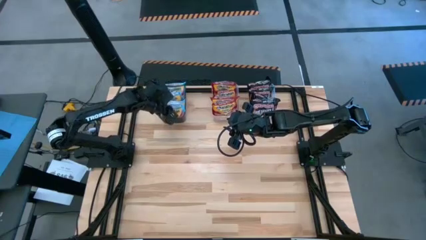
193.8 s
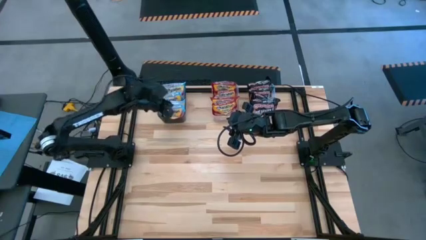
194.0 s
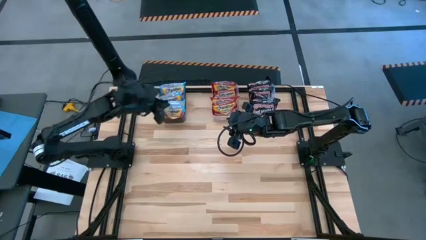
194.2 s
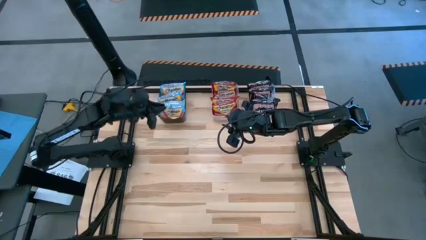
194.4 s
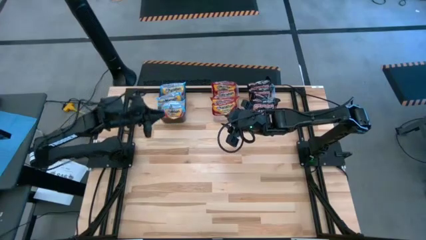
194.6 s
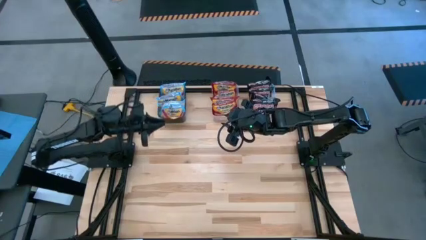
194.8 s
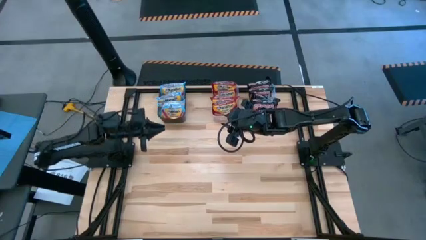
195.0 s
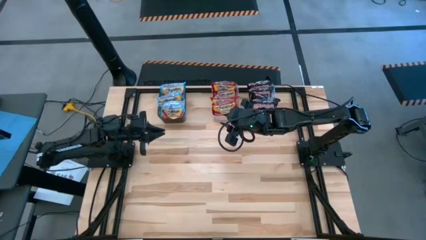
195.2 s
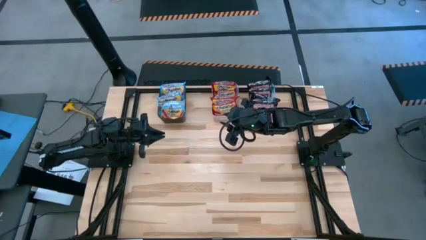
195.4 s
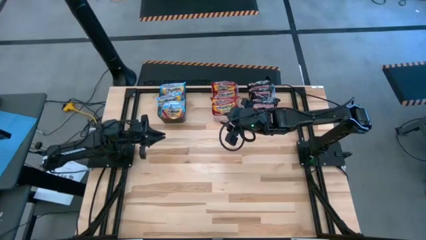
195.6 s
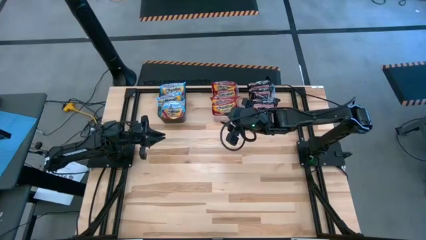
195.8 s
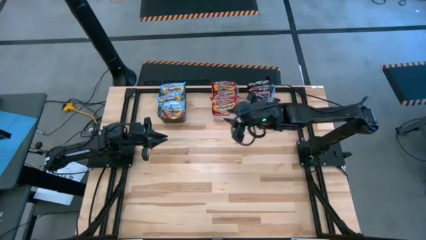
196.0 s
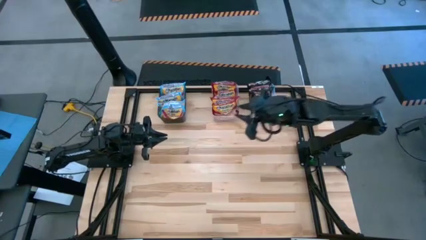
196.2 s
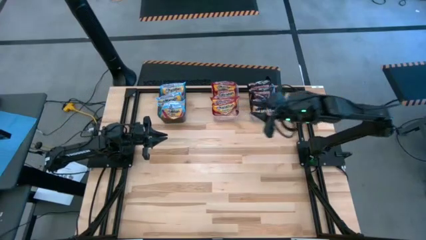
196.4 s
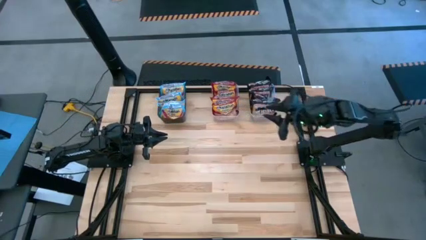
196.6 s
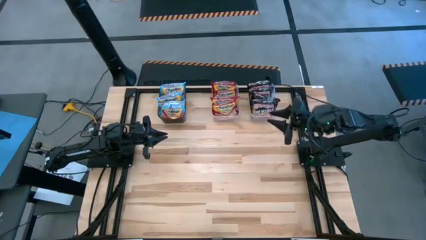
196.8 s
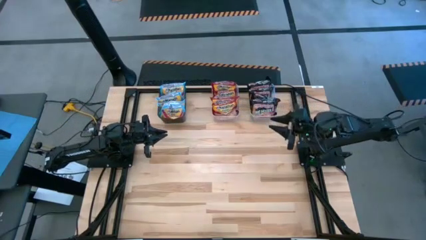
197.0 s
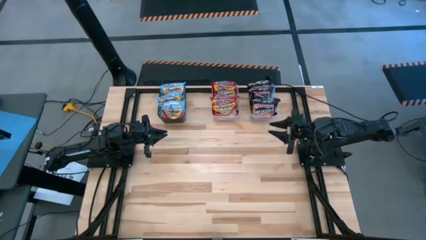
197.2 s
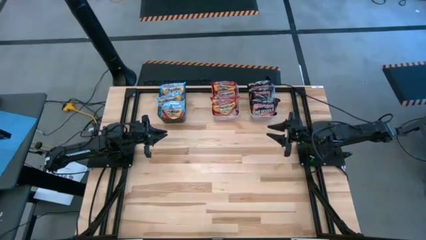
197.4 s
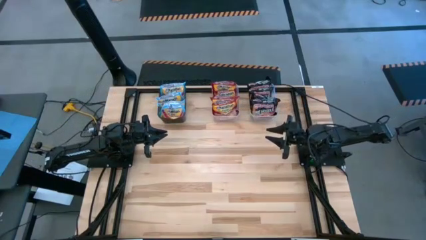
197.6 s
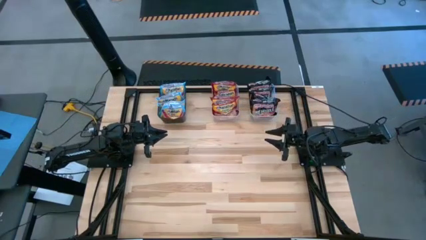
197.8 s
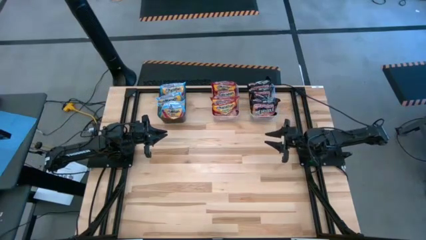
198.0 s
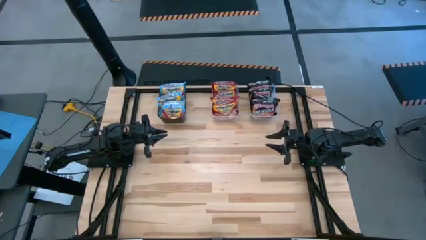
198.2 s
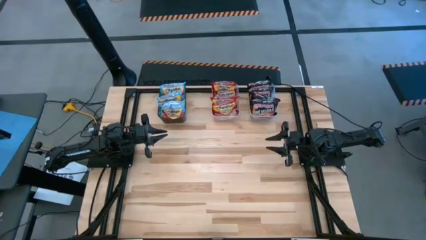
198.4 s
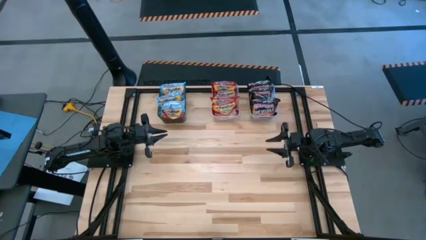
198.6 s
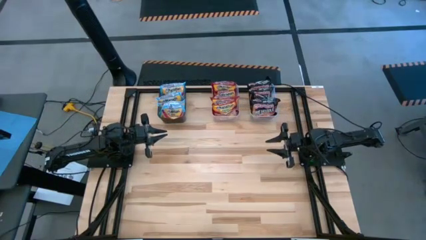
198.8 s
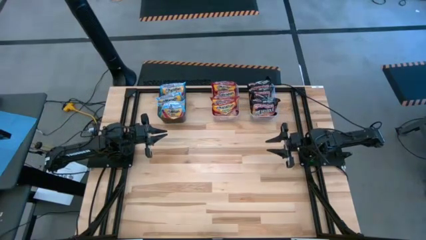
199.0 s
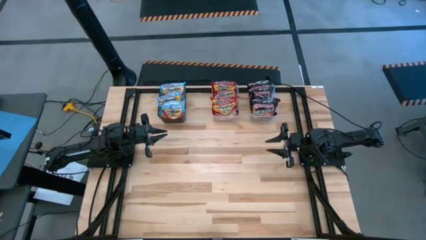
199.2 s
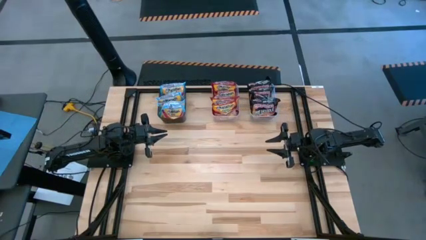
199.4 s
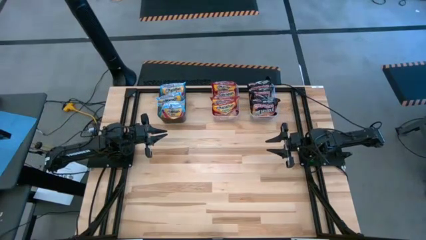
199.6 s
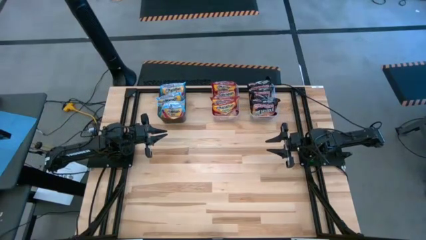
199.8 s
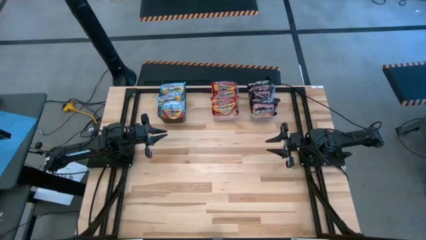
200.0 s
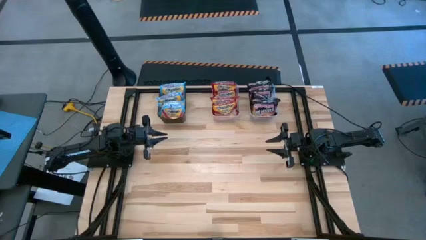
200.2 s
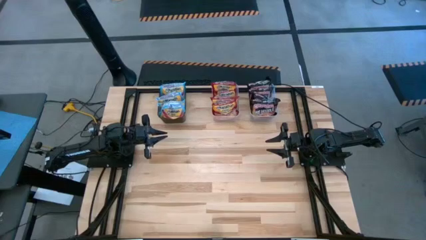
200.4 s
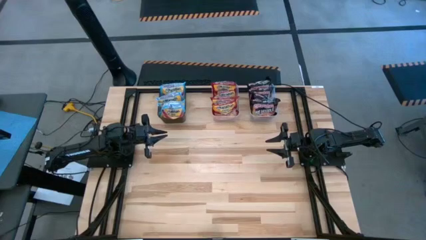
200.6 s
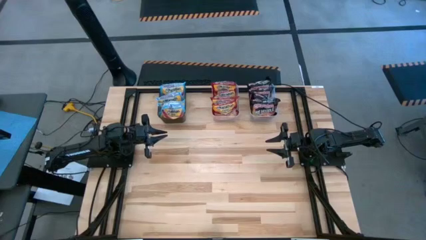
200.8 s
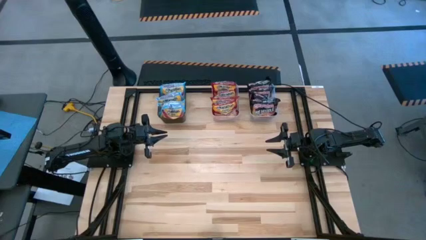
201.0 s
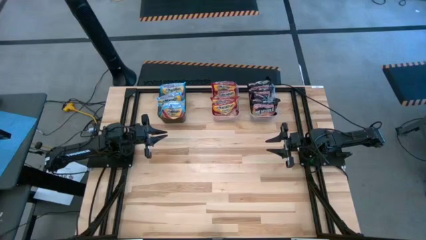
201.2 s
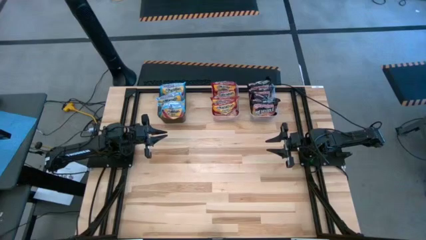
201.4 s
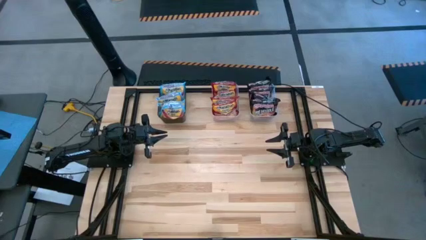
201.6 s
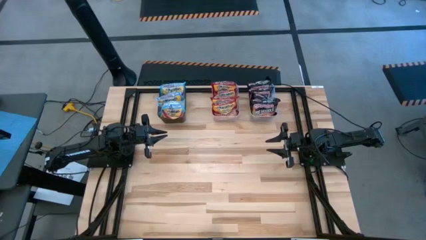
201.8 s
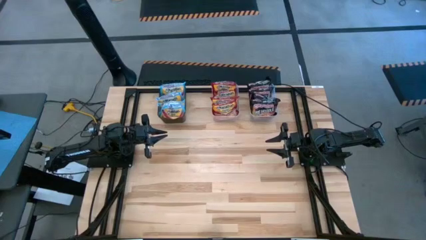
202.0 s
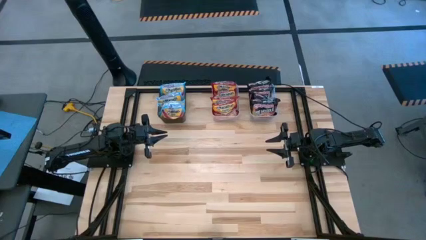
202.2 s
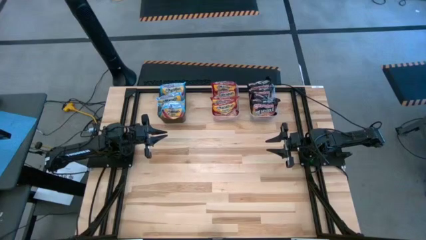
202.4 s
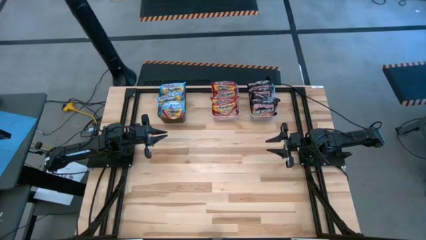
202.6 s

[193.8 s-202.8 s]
Task: Sort Maruchan noodles
Return to Home Position

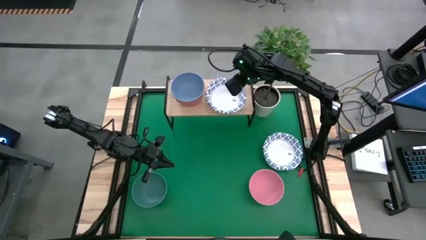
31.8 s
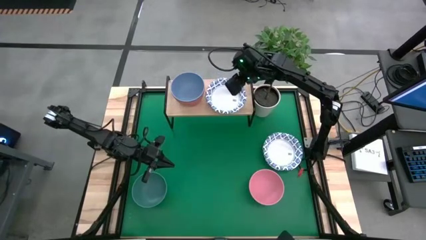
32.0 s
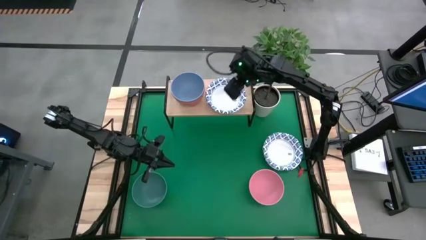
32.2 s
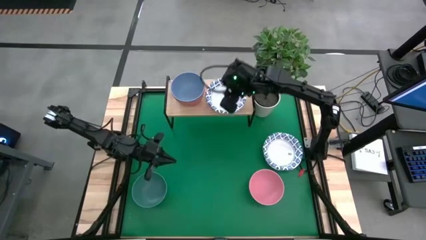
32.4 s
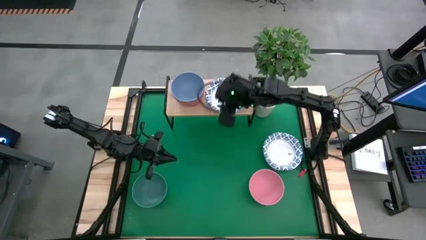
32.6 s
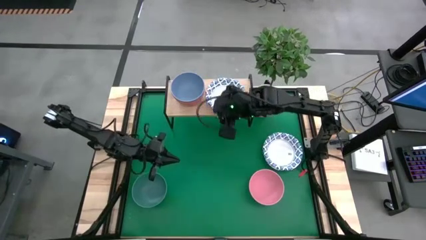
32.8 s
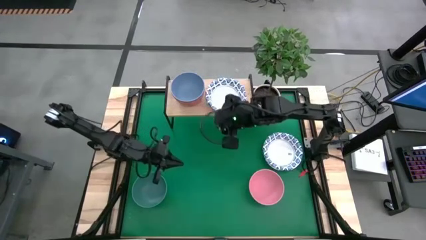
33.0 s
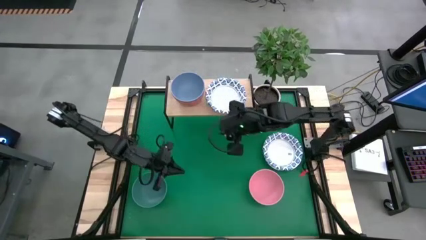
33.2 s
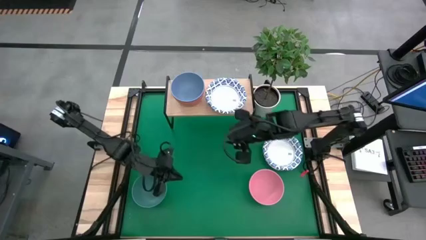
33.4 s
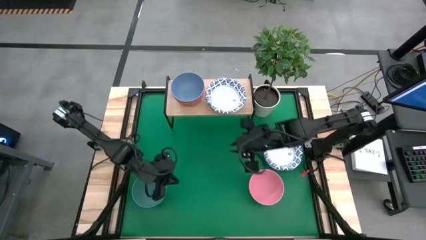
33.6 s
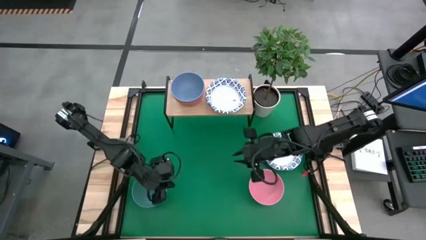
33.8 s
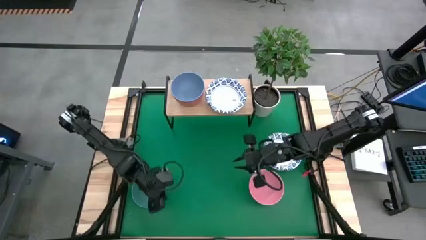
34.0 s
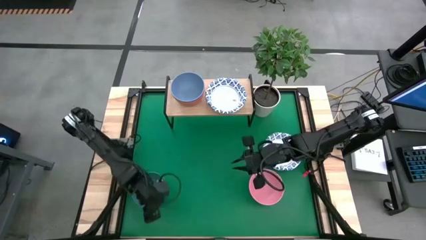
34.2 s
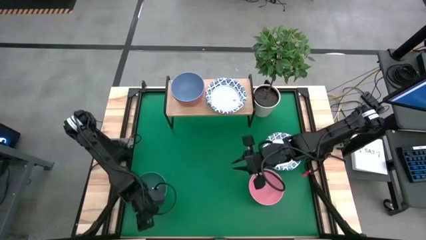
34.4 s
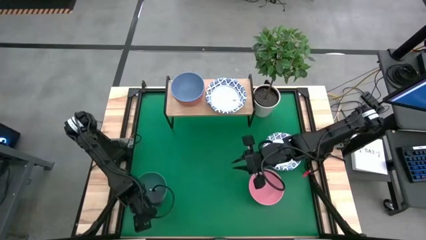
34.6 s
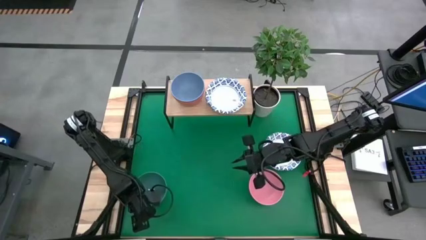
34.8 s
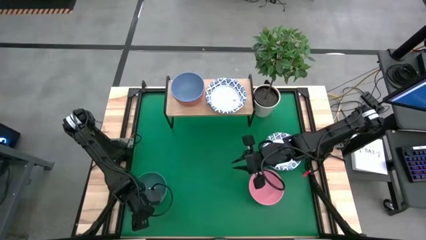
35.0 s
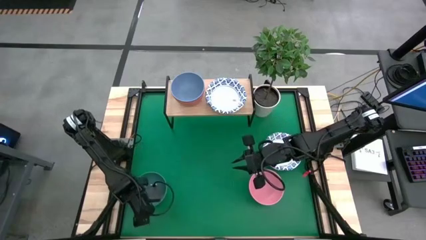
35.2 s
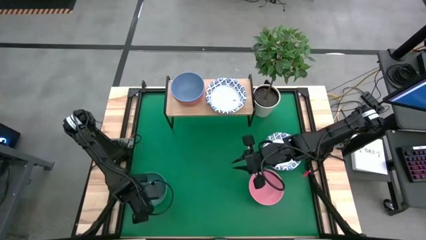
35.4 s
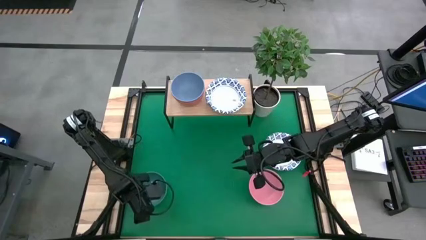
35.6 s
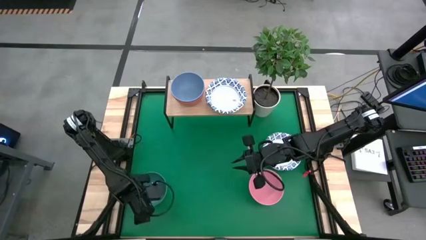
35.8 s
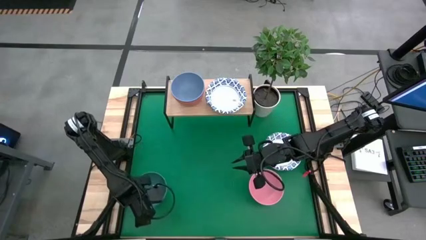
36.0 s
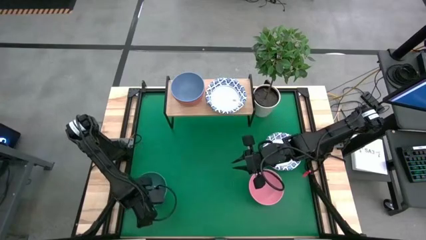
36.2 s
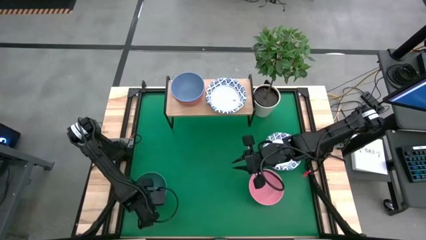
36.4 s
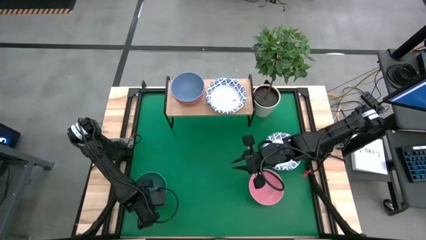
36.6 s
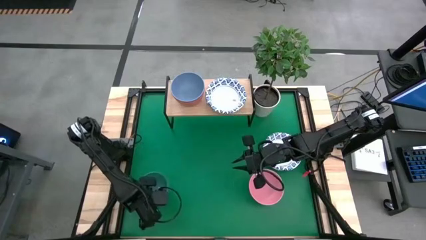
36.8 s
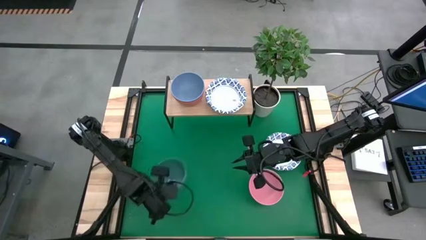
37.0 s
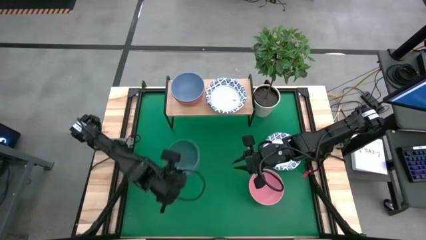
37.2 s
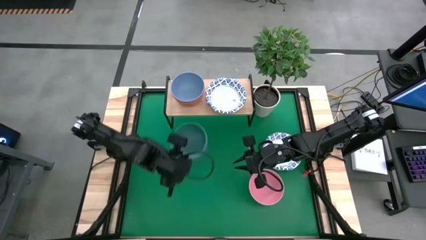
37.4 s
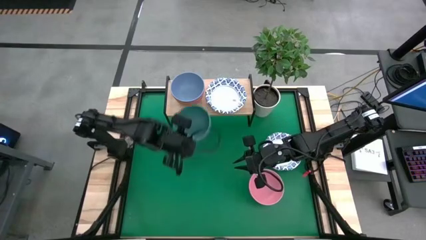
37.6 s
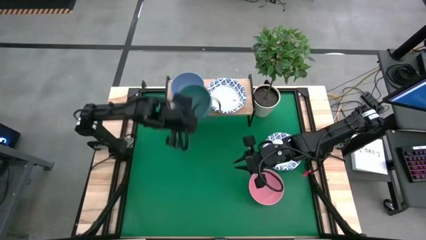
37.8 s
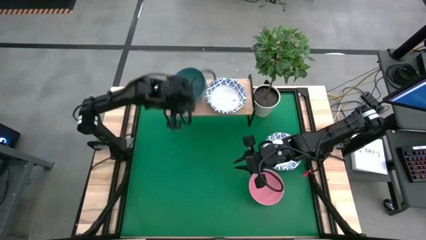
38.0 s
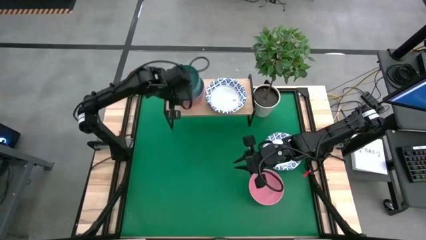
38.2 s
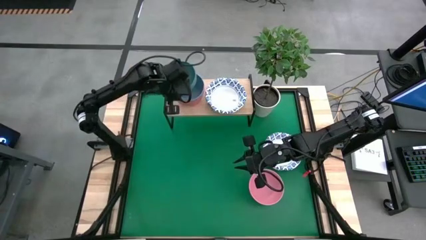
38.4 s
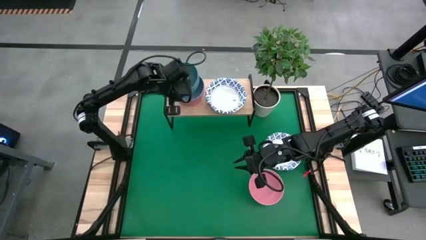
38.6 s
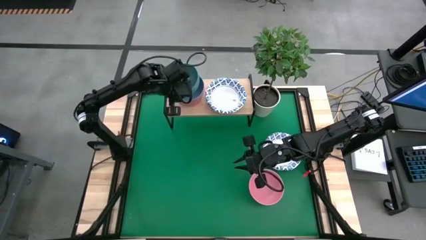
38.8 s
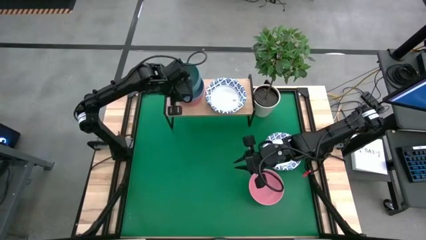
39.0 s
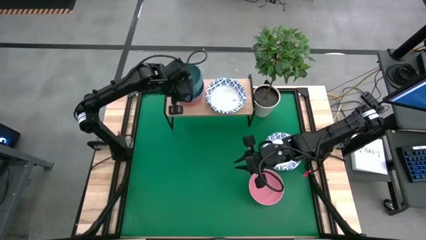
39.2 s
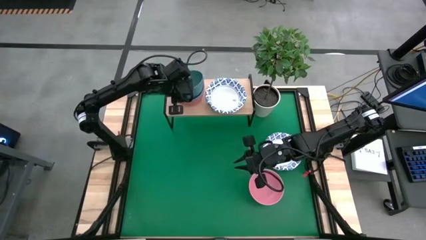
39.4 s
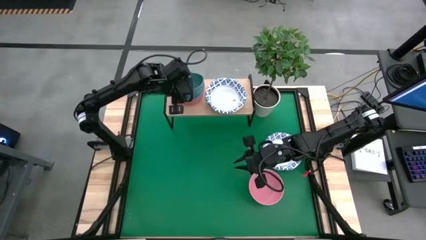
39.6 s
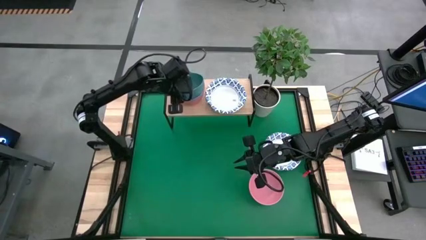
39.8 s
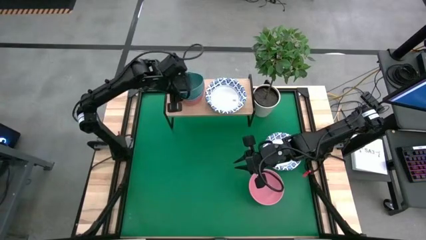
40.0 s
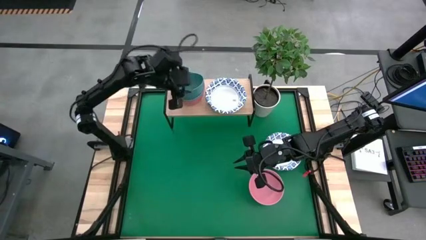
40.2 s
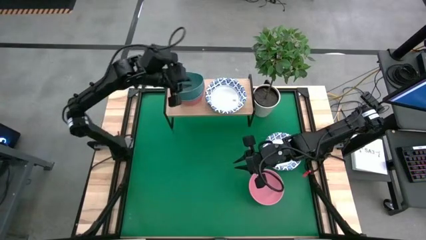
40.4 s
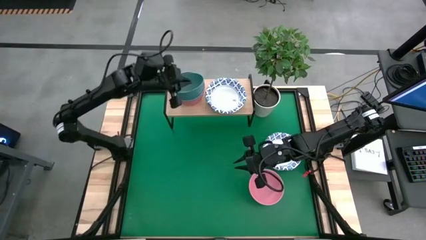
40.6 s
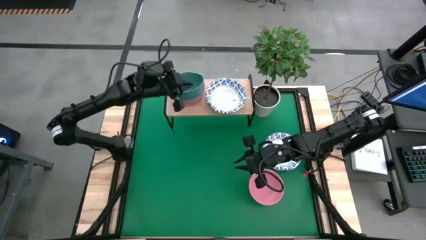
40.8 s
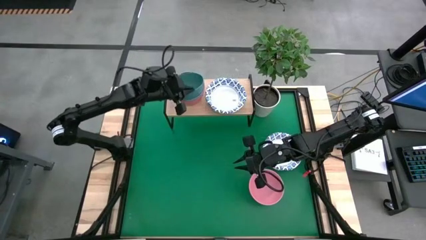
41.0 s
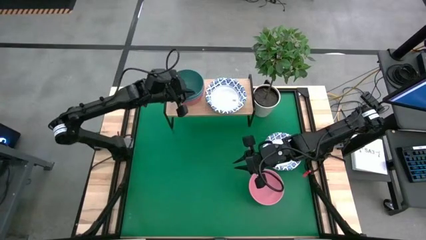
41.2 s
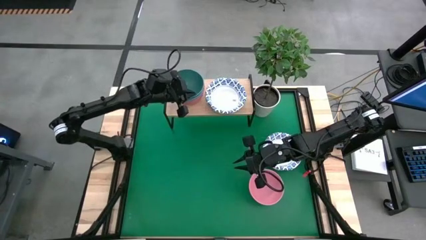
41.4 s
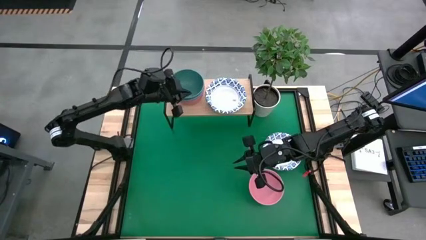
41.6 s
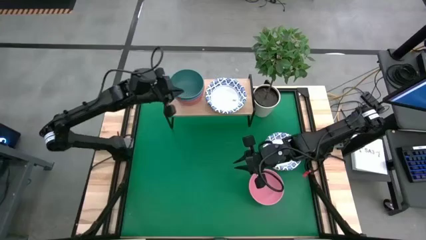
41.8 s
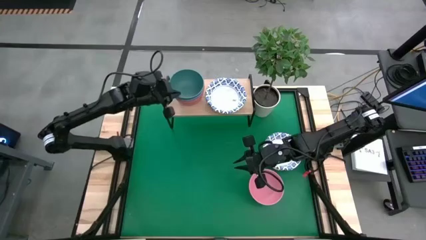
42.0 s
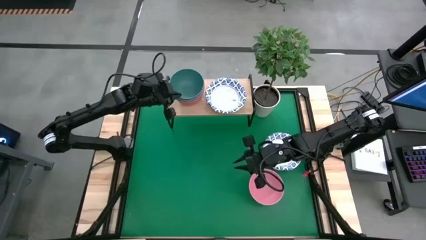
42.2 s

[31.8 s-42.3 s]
Task: Place and stack bowls onto a shelf
Stack the green bowl on top of the blue bowl on the shelf
